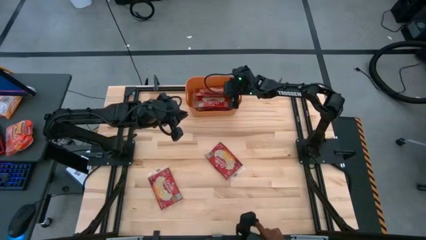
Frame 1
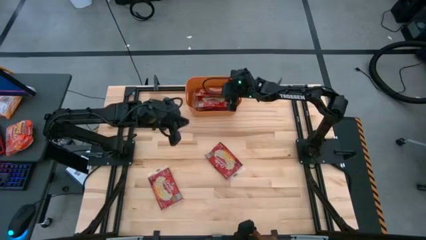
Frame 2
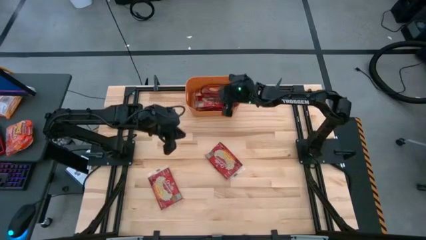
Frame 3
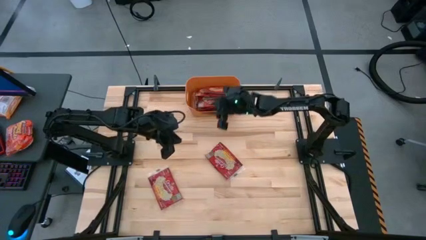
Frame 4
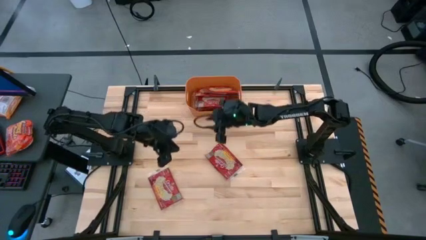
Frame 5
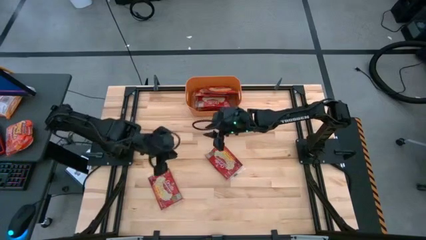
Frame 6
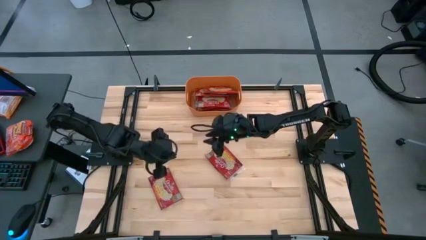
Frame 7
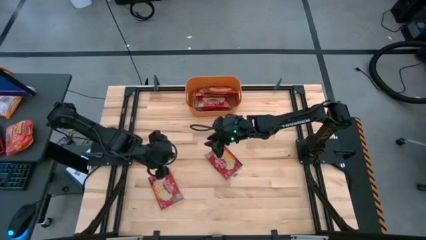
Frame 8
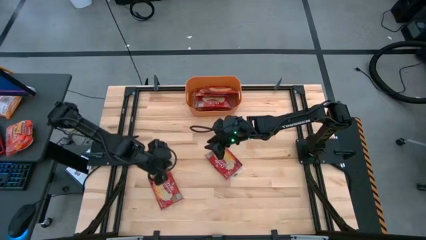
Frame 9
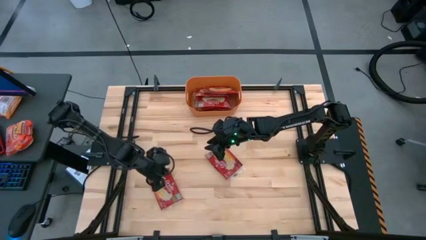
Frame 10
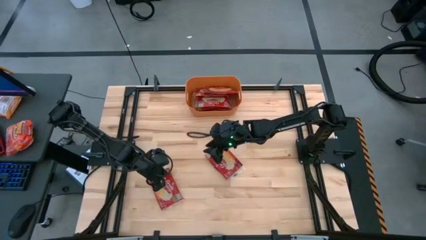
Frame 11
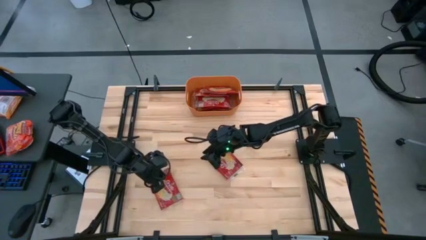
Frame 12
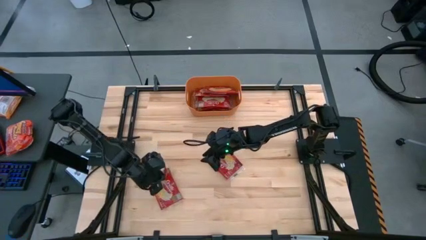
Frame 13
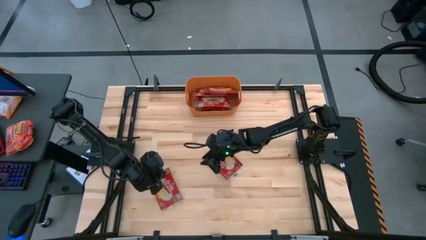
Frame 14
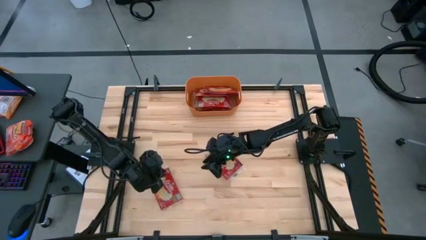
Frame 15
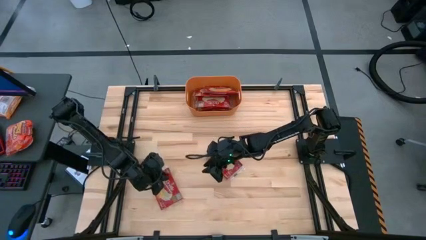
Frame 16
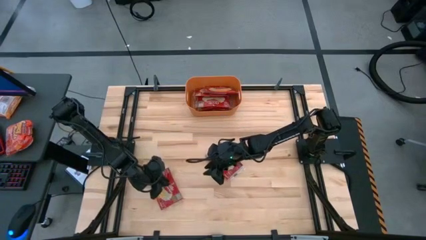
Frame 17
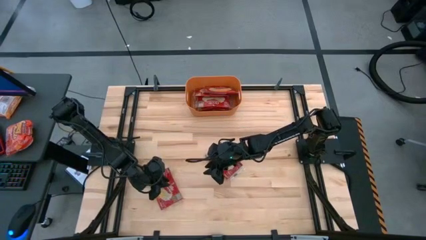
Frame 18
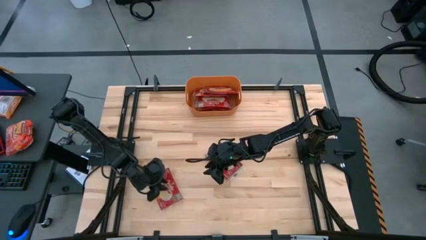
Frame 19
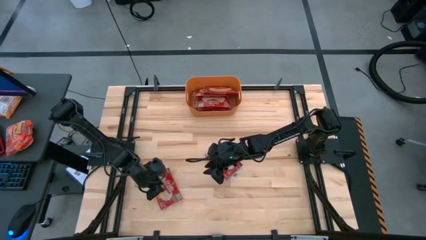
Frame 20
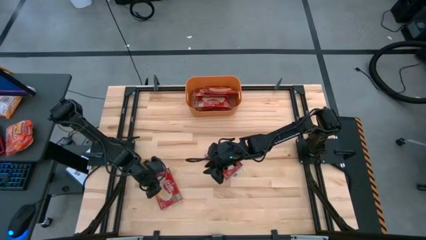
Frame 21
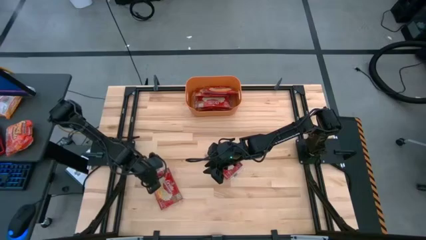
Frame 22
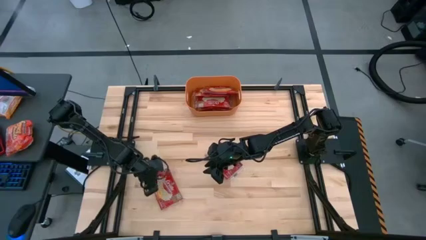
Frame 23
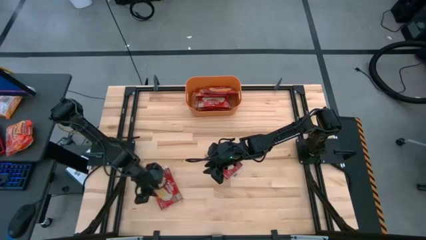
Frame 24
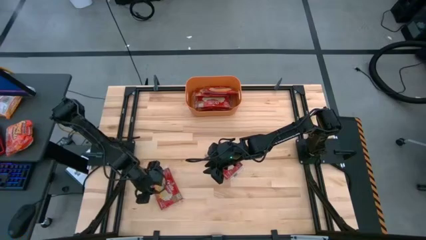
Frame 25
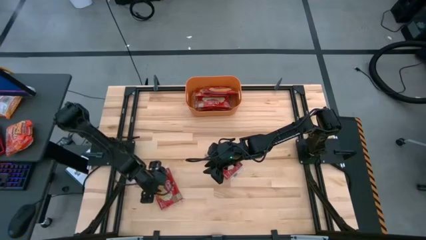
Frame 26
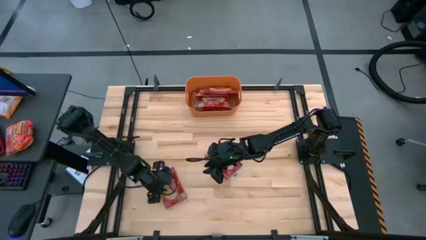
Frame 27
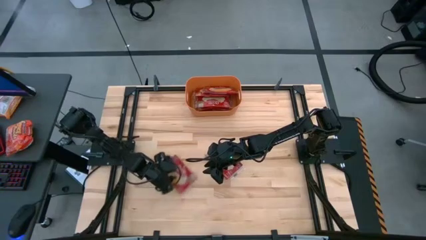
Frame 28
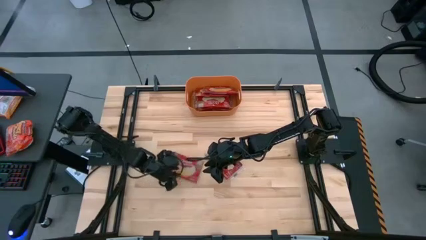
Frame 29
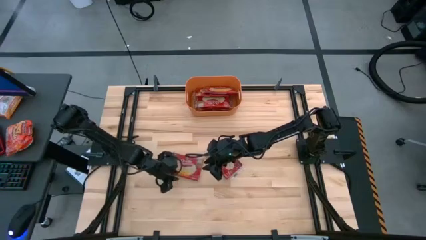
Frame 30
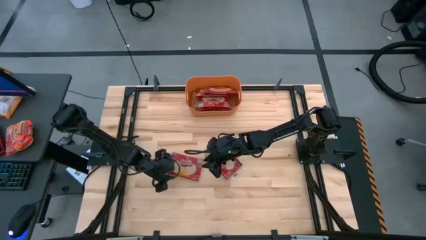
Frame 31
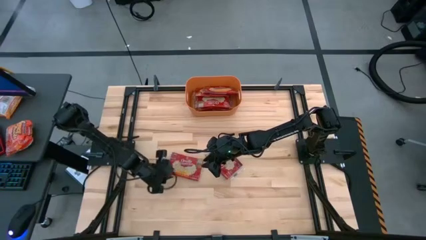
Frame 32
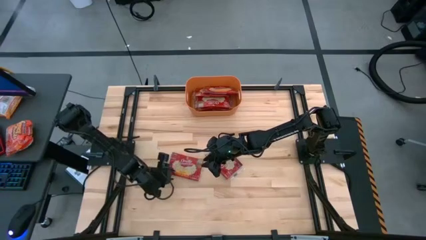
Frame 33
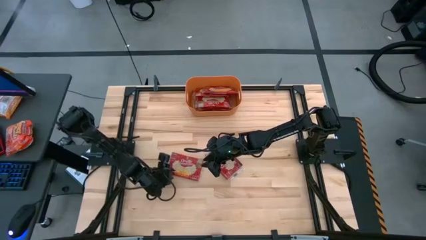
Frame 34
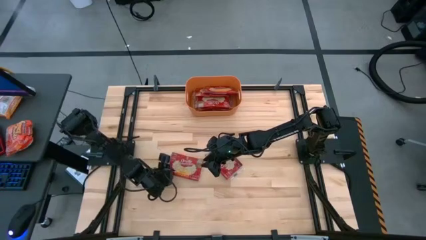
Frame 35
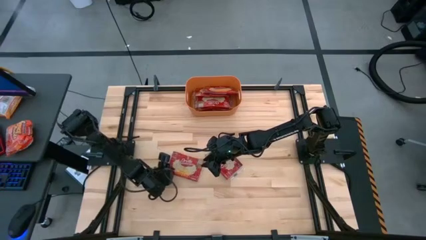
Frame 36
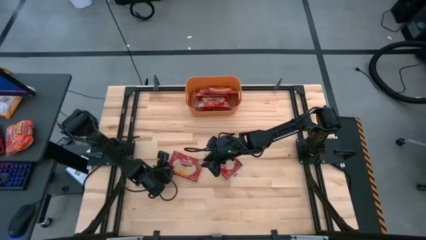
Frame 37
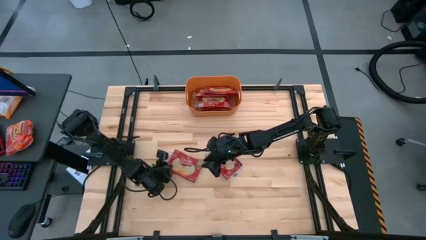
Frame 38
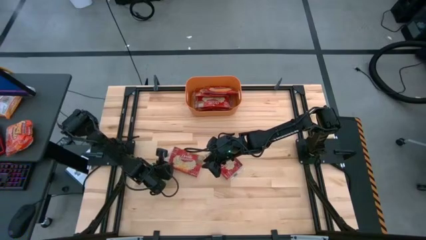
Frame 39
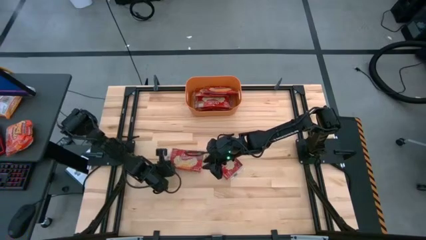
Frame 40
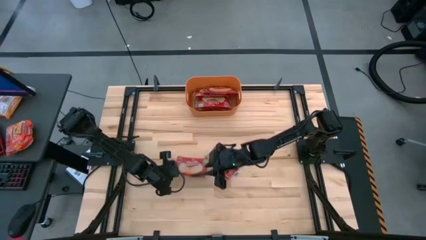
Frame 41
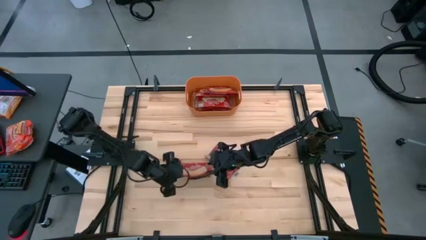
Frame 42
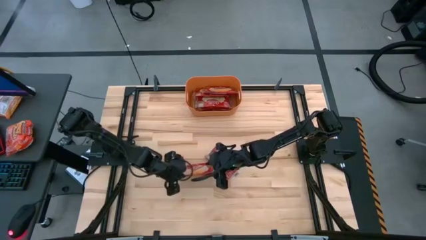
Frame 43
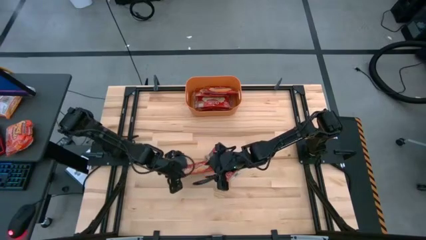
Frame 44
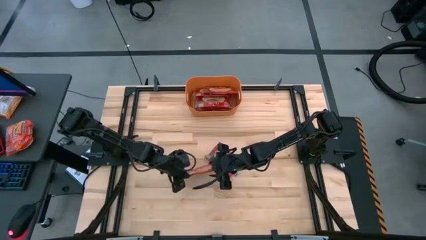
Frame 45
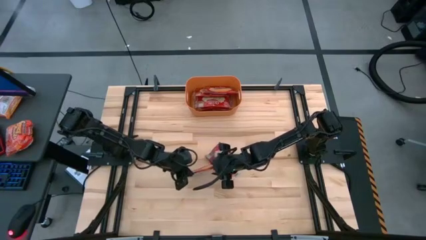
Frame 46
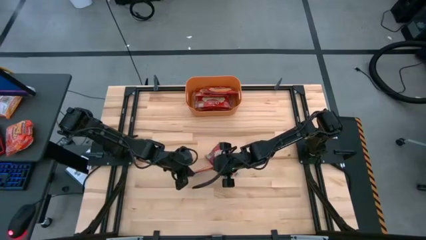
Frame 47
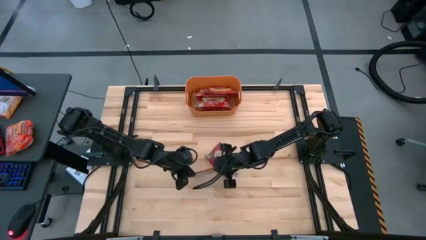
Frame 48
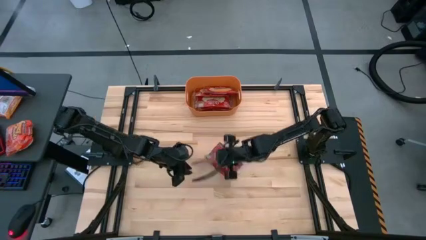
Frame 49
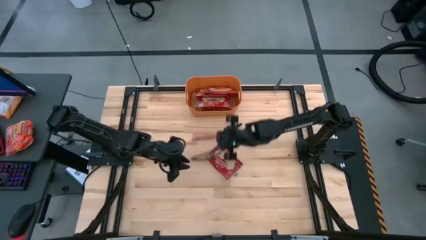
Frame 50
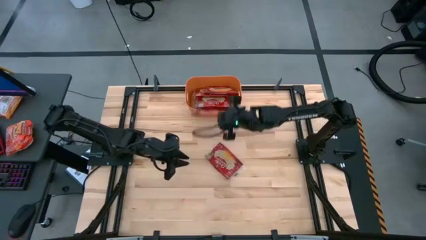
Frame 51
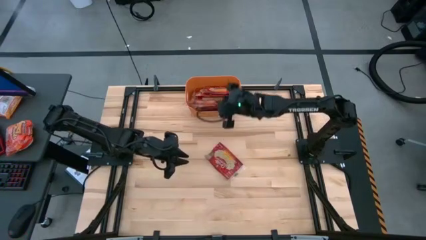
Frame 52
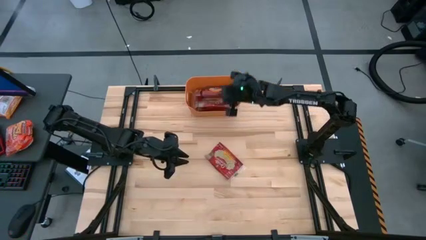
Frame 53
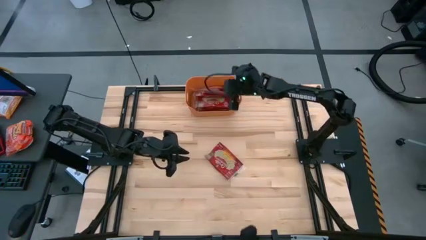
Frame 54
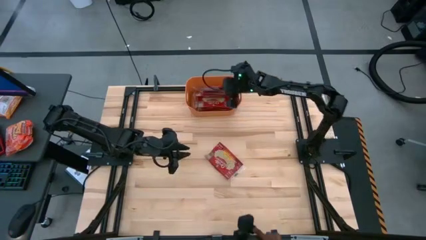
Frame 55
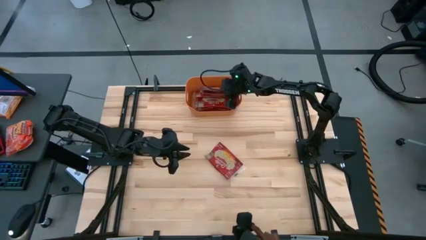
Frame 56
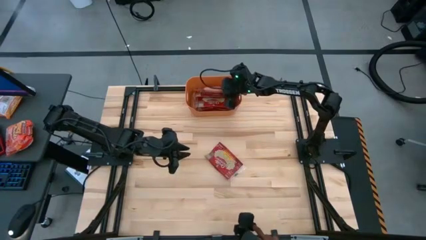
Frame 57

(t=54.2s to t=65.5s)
Task: Sort popcorn bags into baskets
Put the red popcorn bag into the orange bin

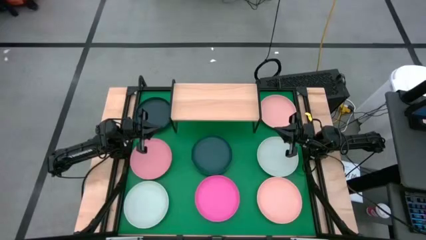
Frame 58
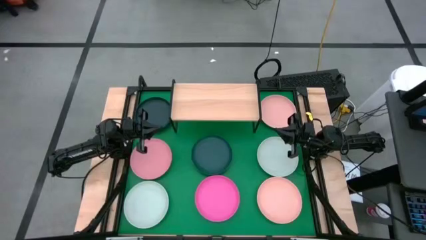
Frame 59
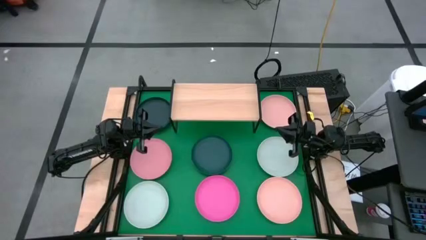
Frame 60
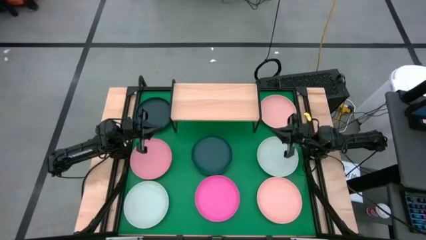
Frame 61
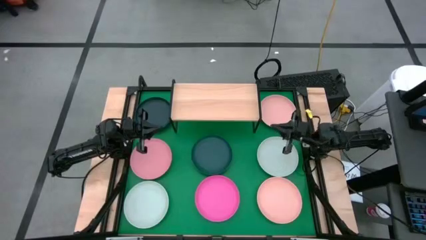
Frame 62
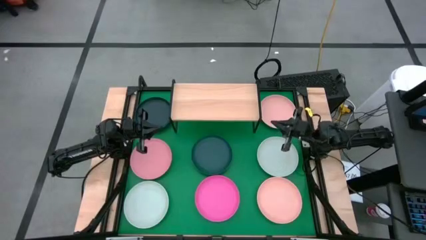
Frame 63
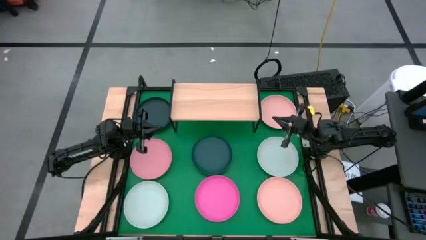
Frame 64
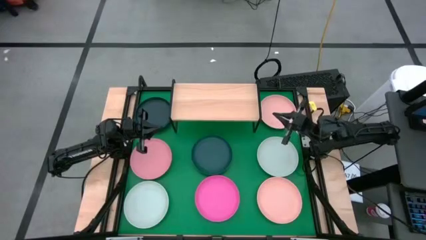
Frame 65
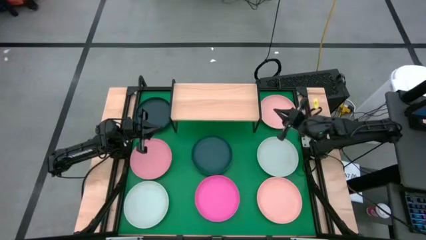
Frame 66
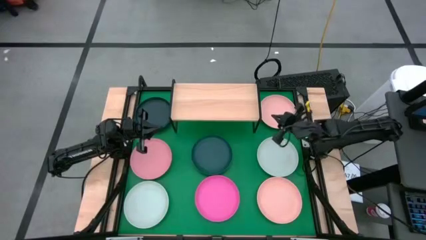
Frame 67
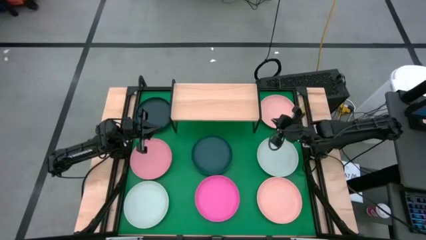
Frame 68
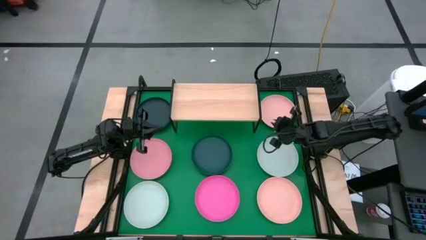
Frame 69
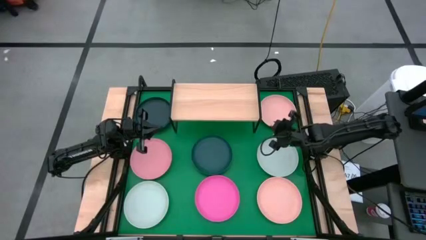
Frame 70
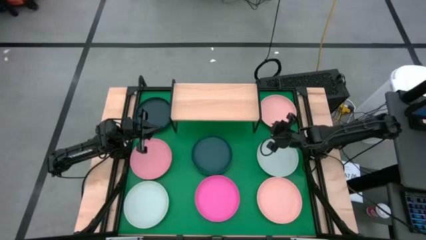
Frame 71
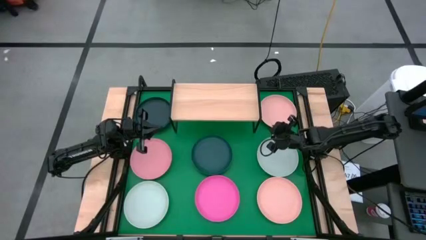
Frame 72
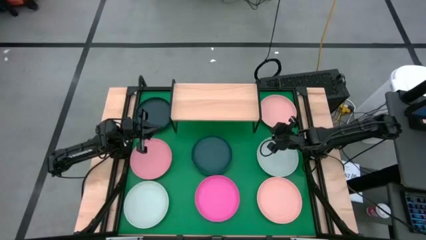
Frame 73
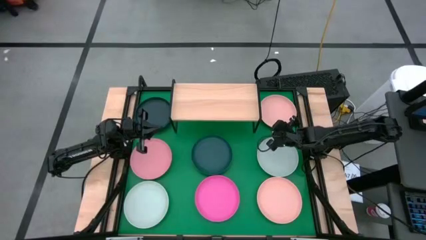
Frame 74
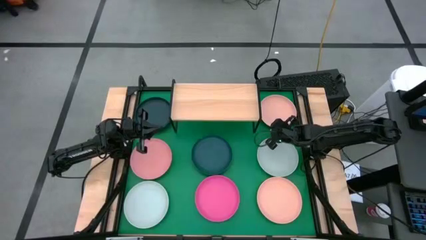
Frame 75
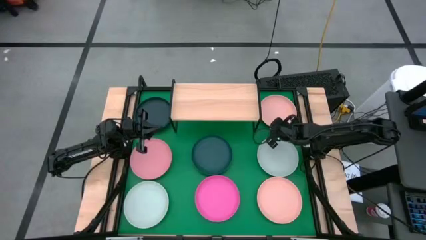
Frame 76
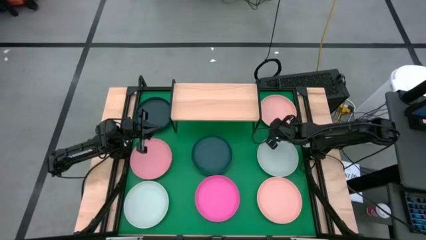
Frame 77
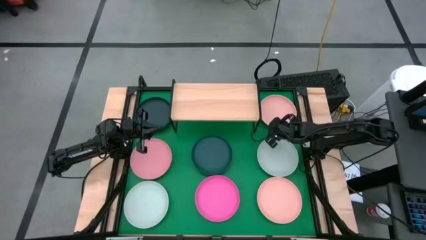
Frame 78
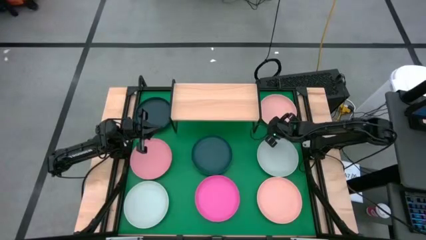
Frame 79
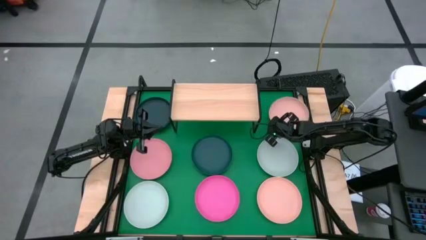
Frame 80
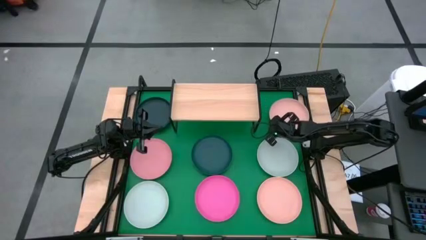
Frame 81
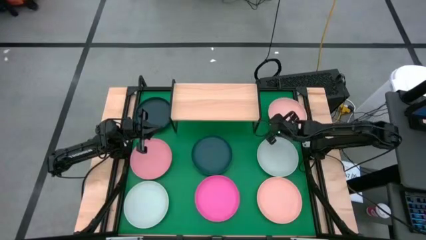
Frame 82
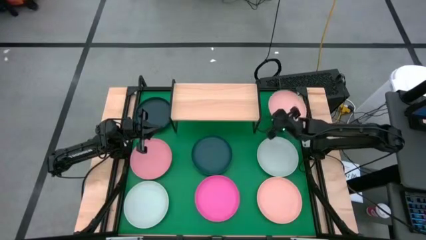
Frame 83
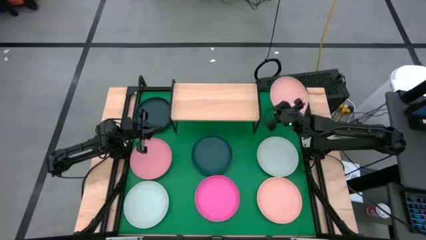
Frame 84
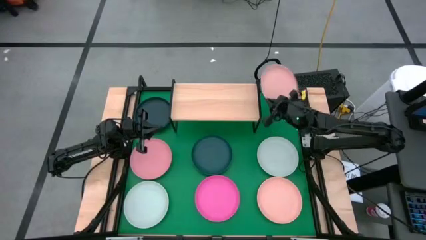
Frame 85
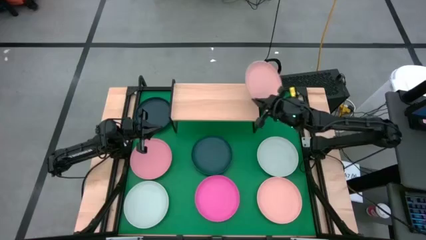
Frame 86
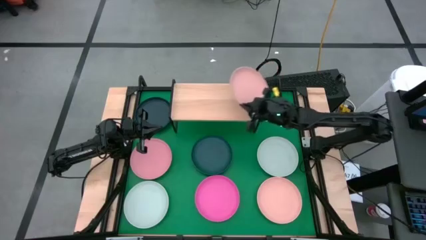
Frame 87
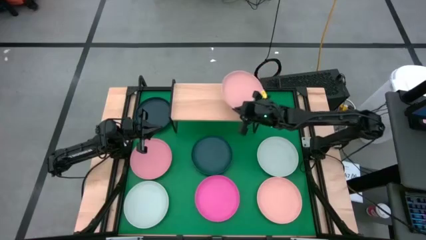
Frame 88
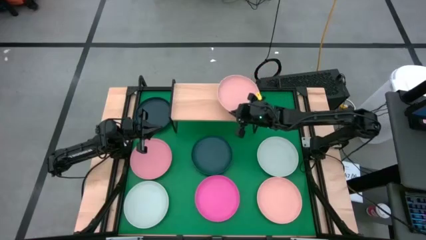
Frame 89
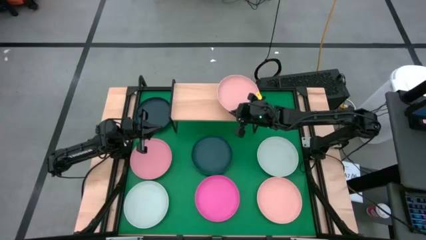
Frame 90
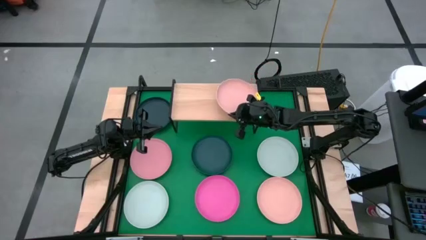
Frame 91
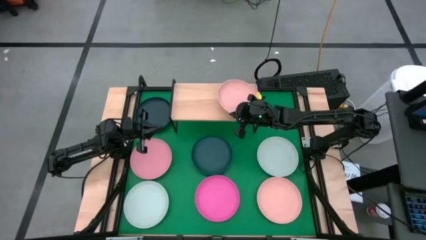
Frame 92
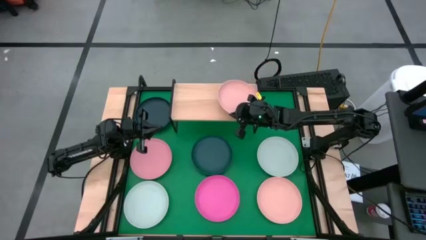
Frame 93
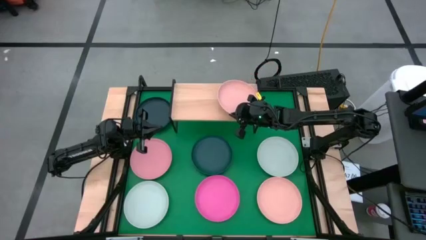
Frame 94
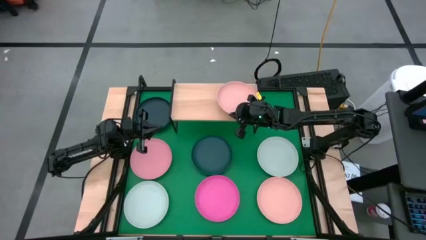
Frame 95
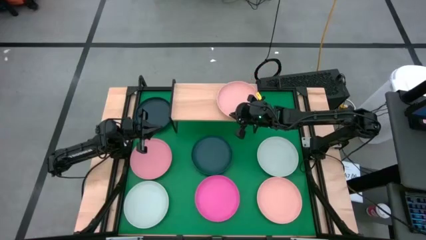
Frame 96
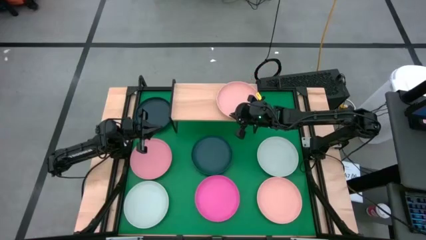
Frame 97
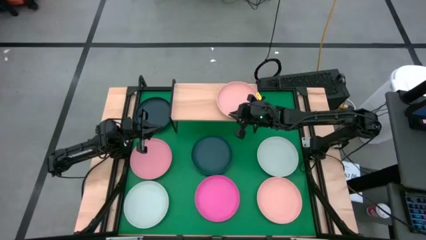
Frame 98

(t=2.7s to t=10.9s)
Task: Place and stack plates onto a shelf
Put the top light orange plate on the shelf
